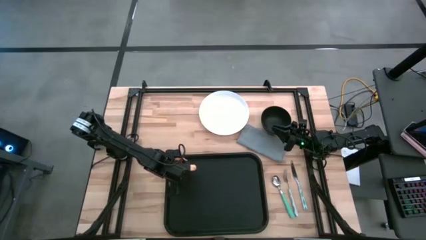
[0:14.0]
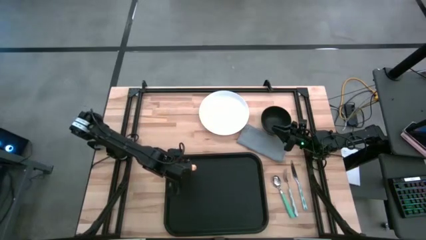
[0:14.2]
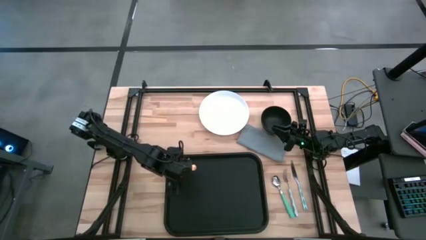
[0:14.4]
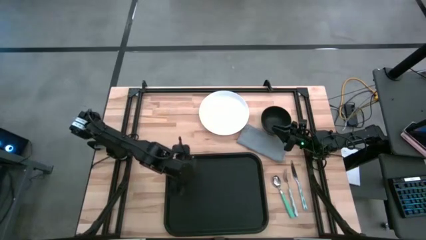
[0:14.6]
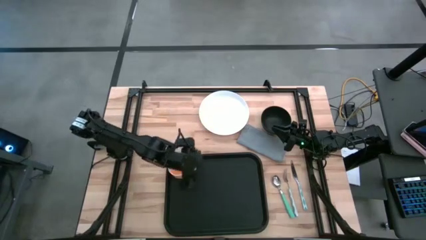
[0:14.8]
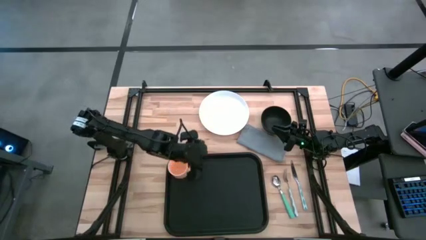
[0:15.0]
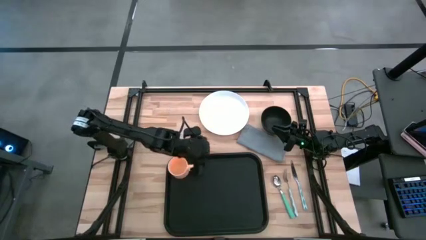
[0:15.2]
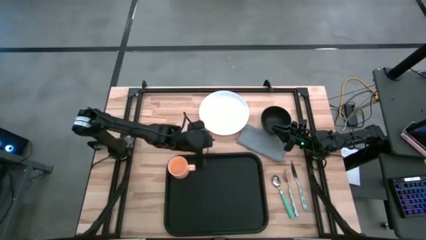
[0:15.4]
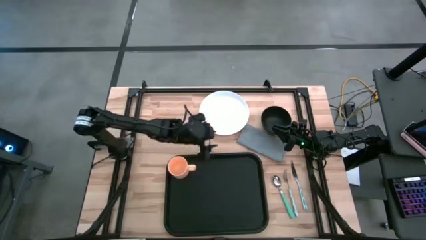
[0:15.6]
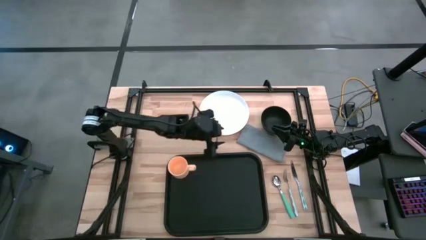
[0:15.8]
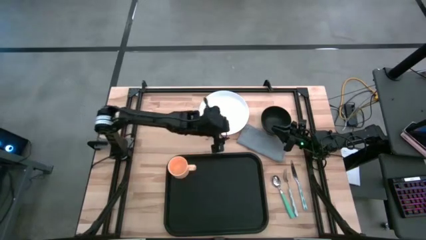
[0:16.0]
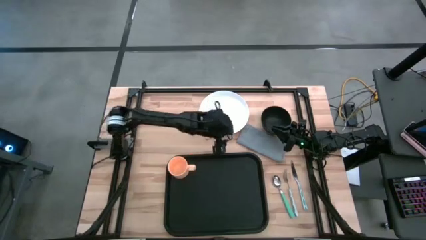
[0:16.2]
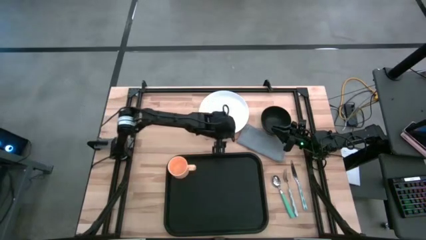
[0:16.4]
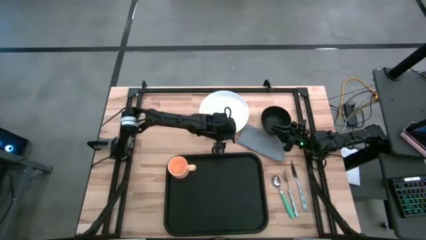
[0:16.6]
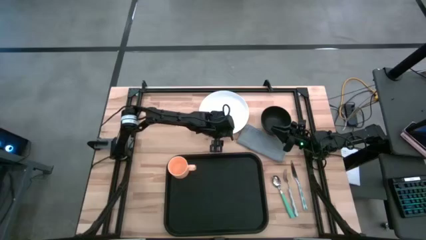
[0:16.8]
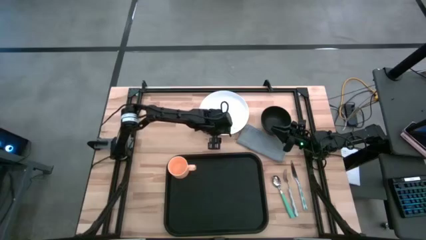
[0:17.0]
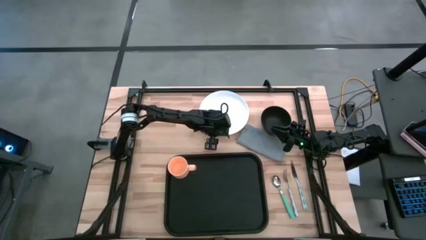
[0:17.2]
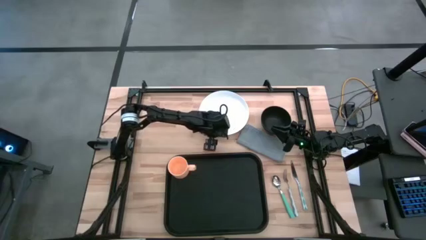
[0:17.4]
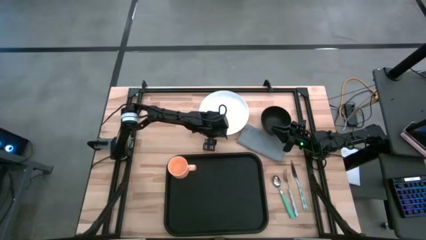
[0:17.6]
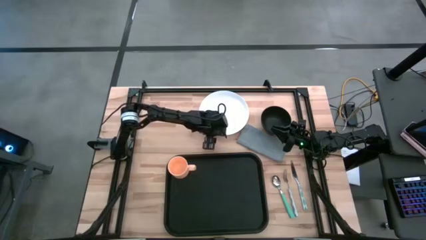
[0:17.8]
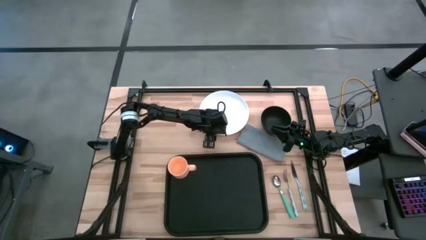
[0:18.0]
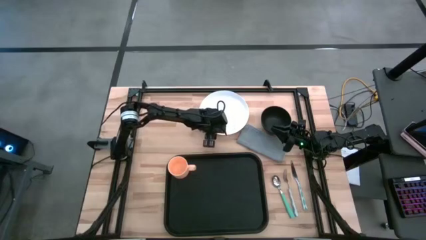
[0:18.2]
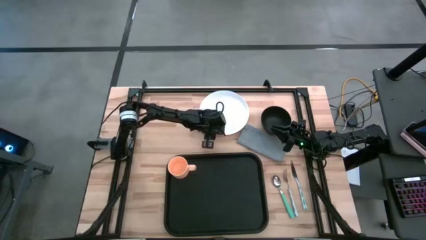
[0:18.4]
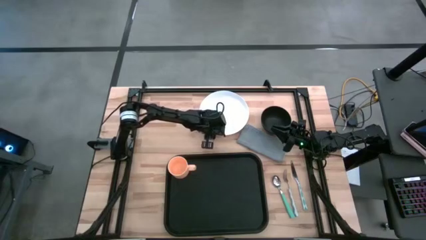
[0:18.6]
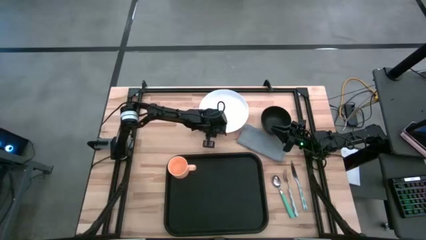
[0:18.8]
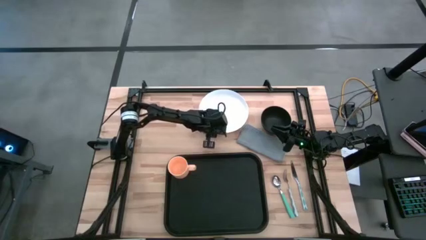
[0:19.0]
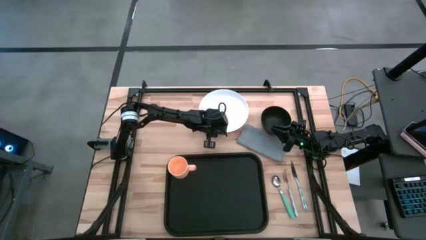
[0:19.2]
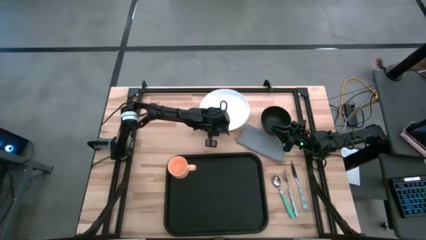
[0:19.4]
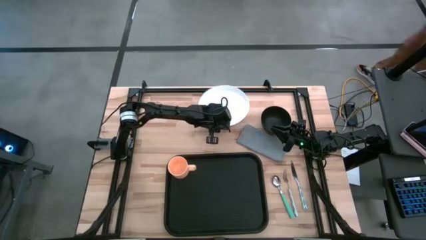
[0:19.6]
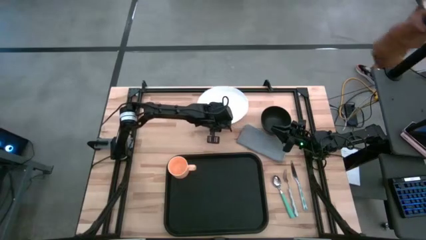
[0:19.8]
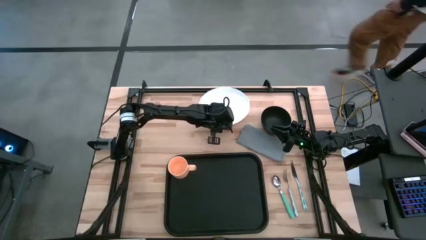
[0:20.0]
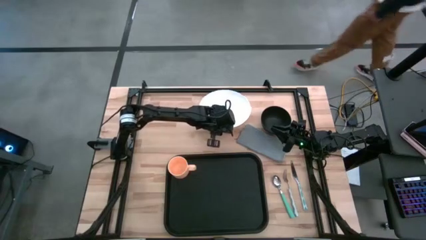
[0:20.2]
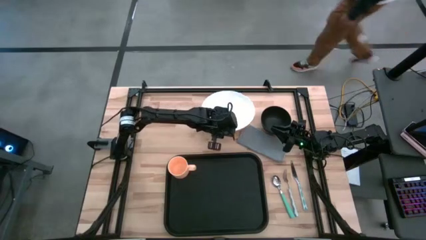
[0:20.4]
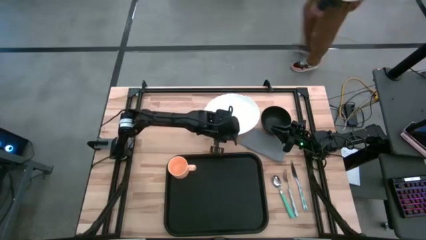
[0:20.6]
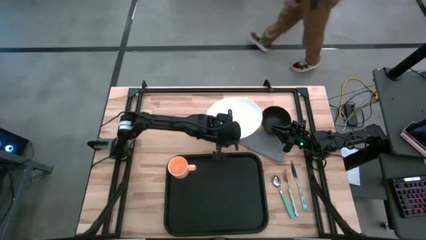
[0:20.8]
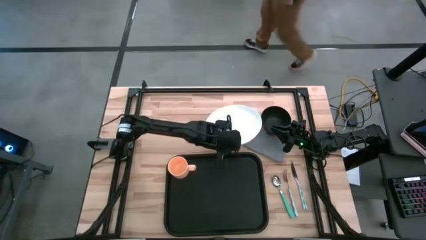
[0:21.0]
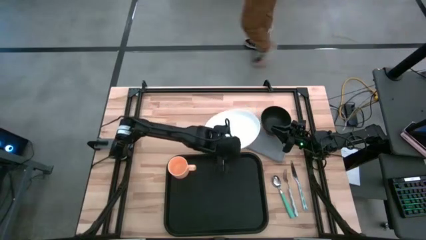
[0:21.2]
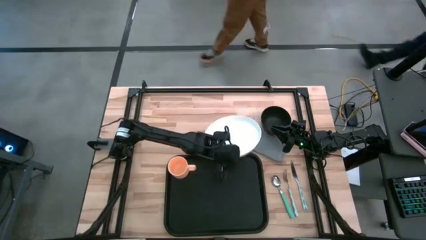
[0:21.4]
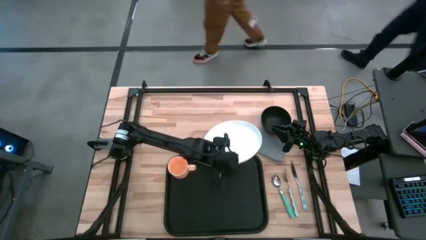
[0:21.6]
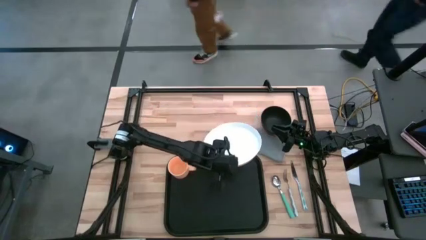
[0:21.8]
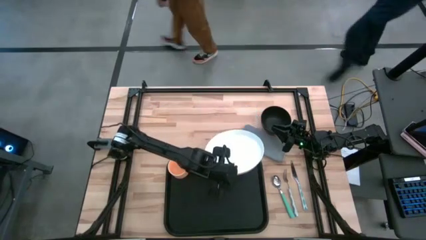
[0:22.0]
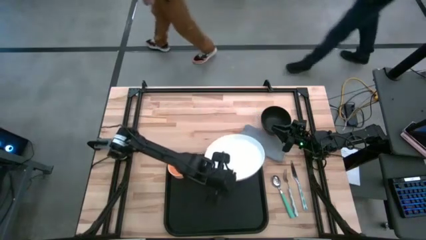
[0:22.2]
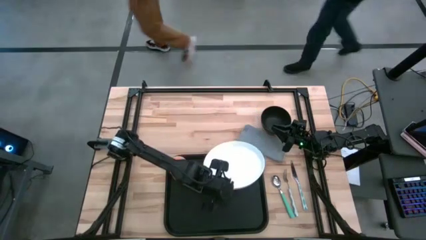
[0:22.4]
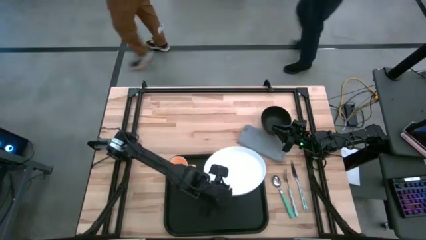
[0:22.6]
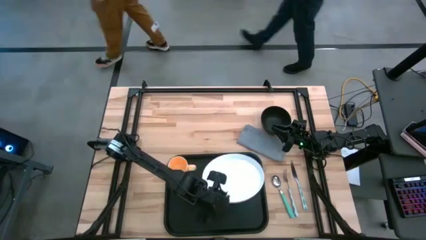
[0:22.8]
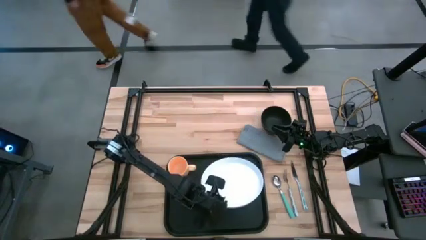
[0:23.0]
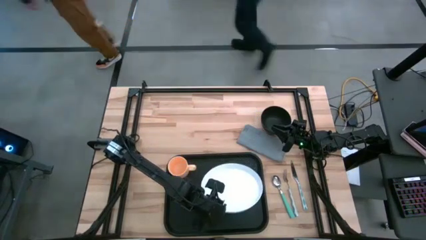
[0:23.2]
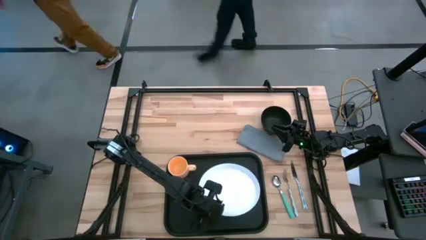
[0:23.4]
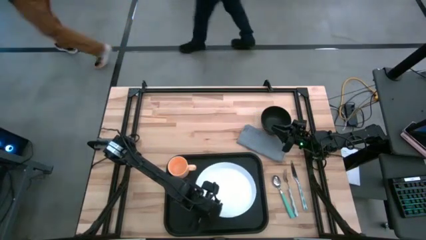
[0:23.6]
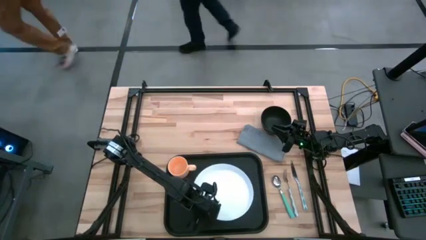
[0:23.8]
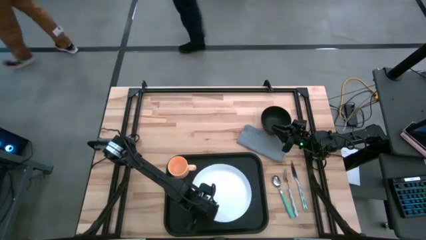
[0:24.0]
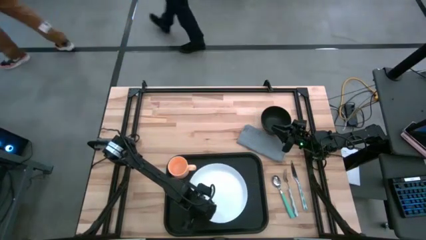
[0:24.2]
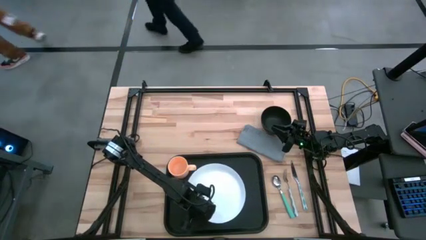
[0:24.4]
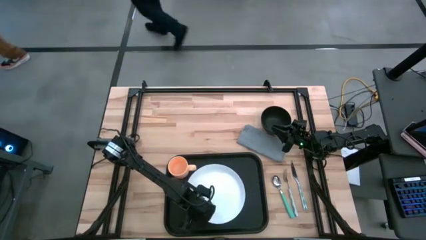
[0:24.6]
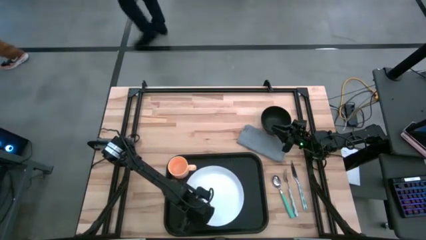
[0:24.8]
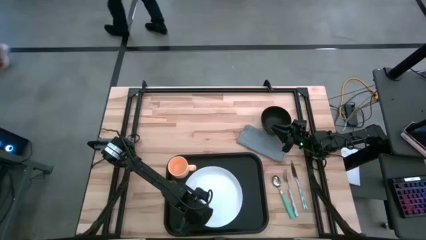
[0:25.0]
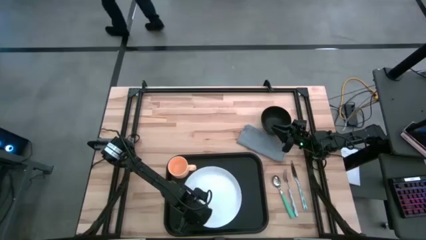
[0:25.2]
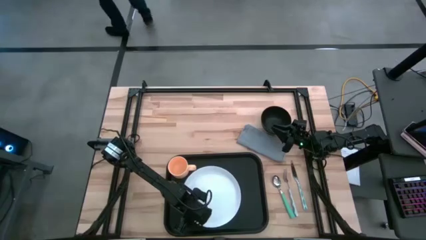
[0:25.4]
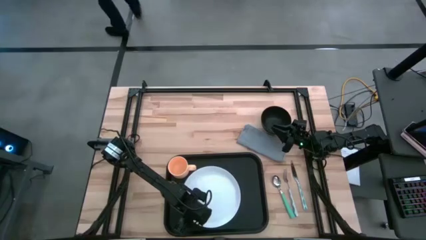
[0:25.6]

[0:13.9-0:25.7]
Task: Set up tray
Put the white plate on the black tray below the yellow mug

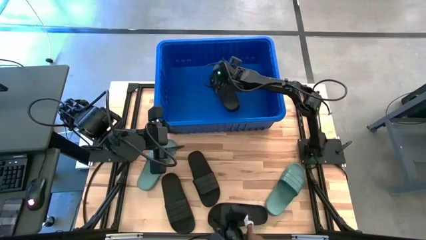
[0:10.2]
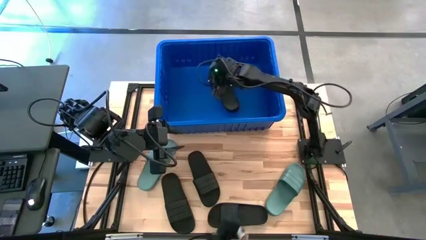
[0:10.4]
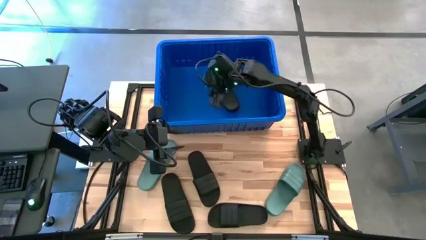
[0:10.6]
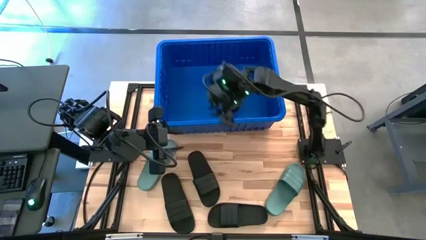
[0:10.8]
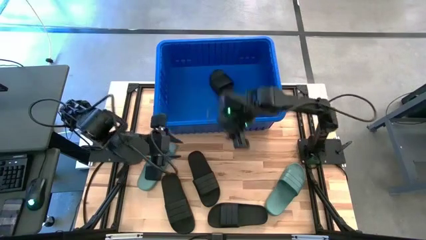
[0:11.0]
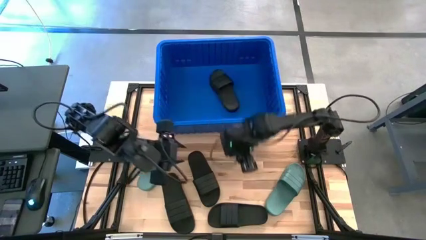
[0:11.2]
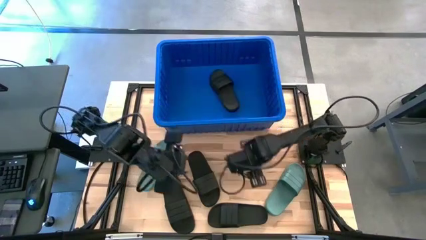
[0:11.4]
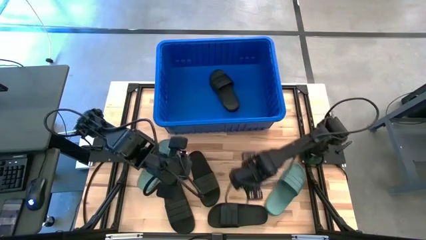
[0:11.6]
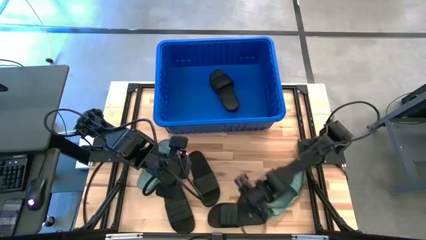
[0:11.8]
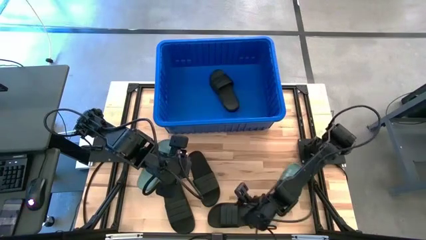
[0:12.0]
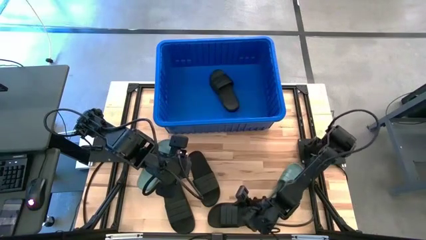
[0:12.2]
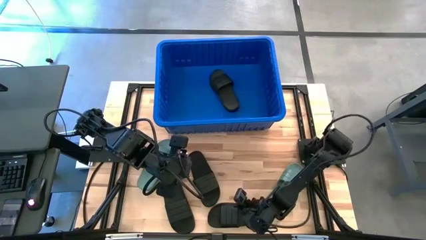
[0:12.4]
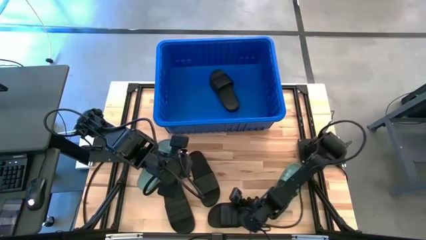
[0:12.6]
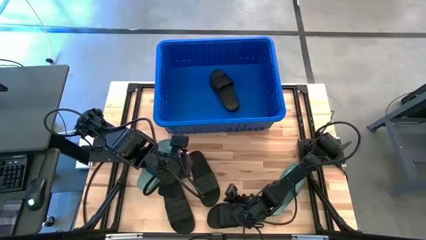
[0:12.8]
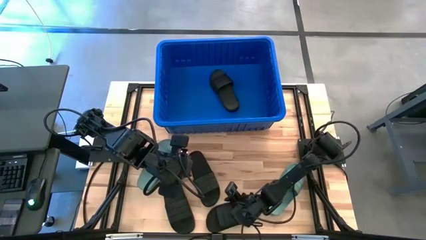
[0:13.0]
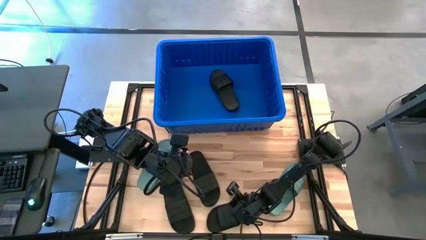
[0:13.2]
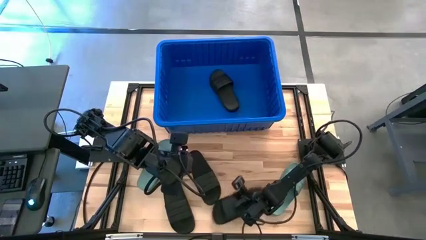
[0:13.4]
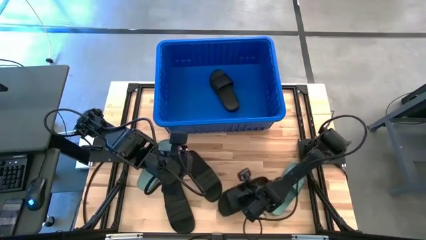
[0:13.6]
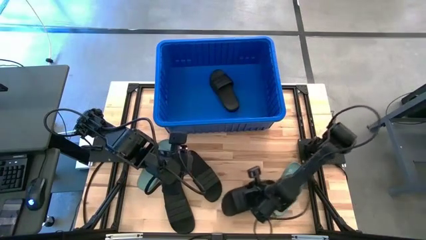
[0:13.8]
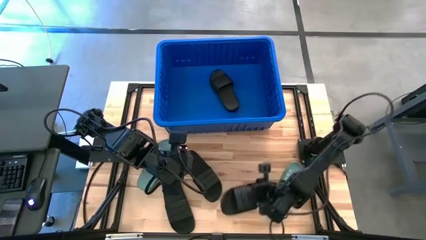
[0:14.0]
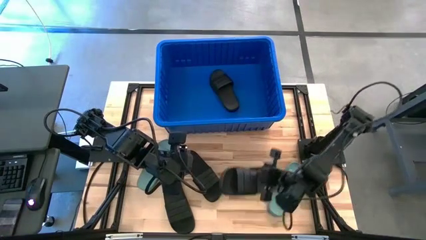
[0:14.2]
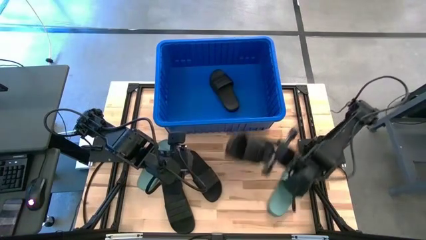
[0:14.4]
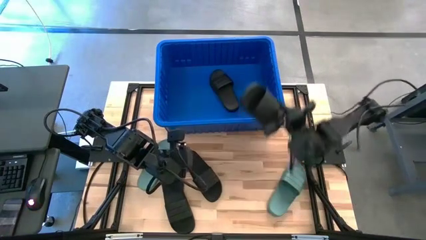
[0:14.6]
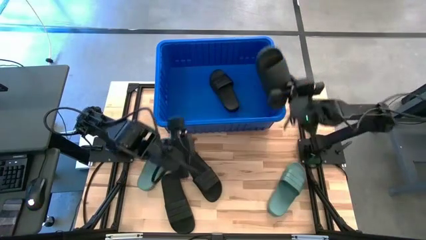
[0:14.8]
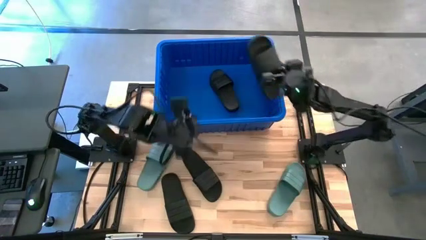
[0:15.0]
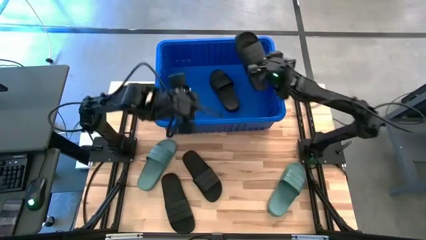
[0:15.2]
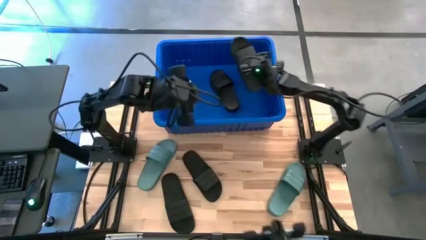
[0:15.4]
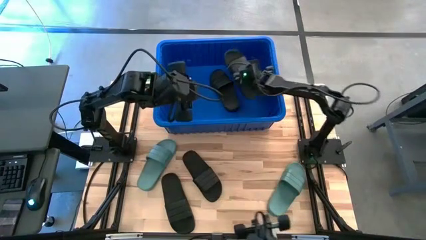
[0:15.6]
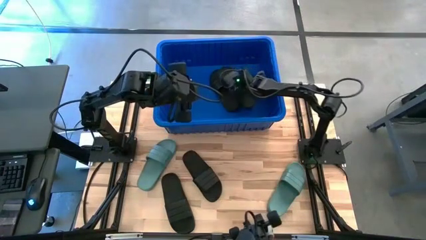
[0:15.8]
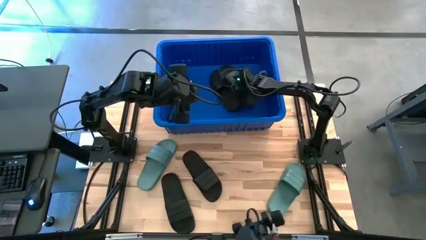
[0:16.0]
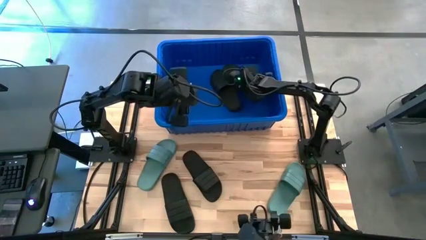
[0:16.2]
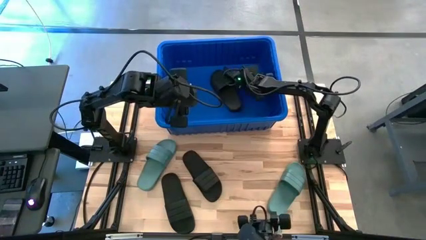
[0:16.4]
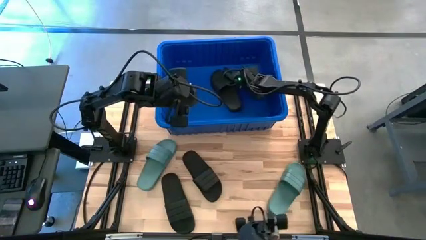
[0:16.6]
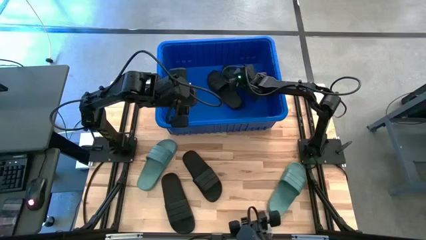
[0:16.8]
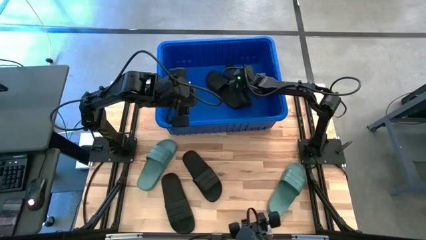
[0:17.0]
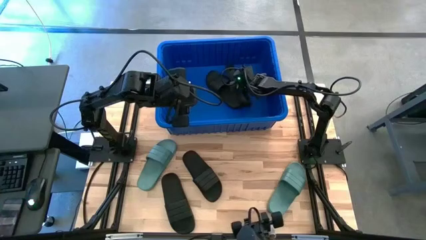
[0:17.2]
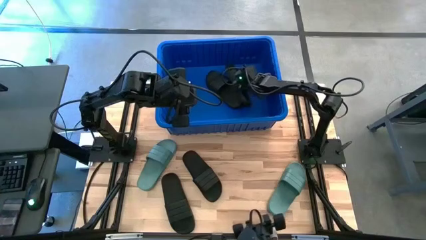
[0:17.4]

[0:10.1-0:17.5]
Task: Pick and place slides into bin
Put the black slide into the blue bin
